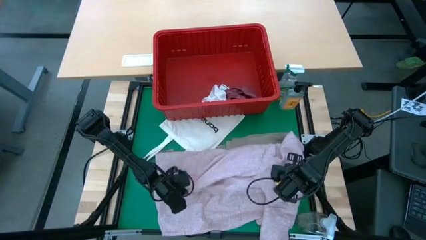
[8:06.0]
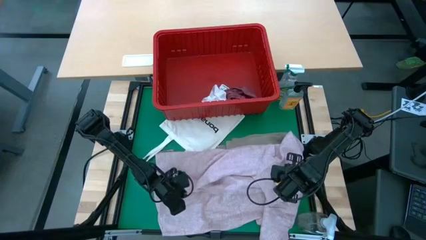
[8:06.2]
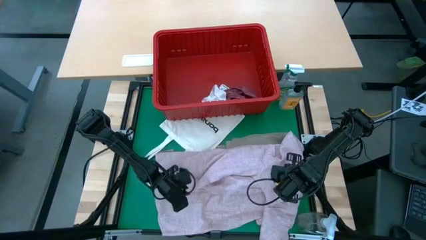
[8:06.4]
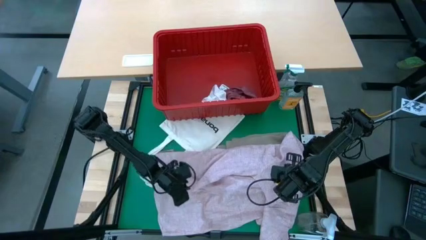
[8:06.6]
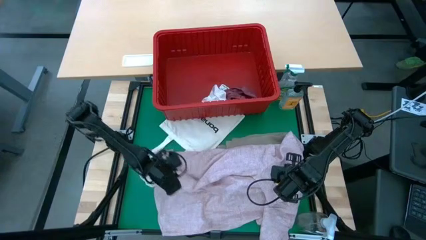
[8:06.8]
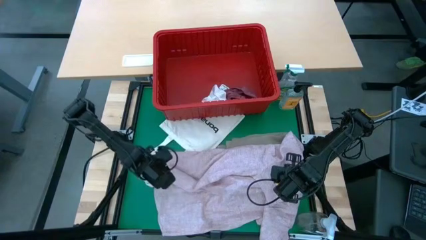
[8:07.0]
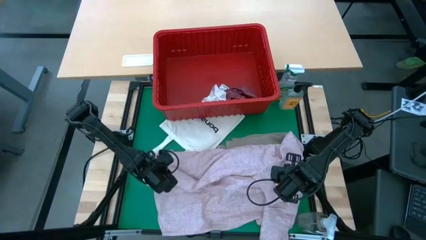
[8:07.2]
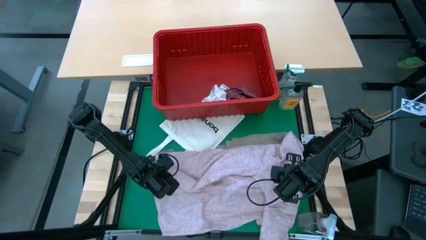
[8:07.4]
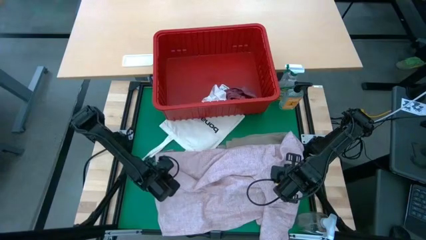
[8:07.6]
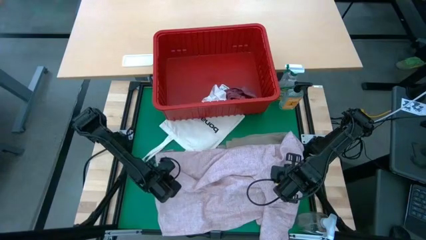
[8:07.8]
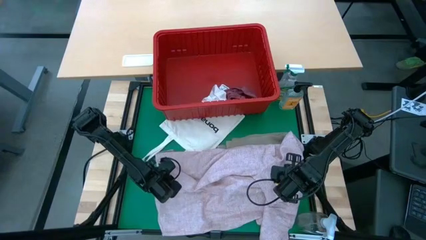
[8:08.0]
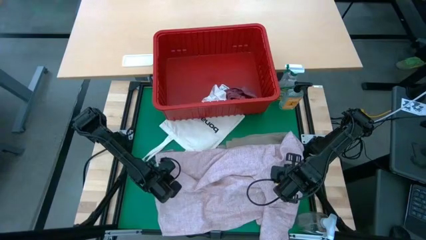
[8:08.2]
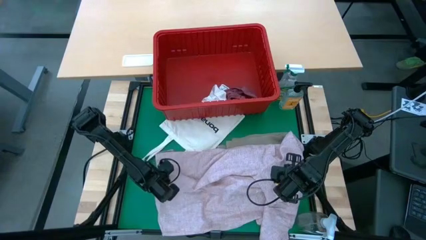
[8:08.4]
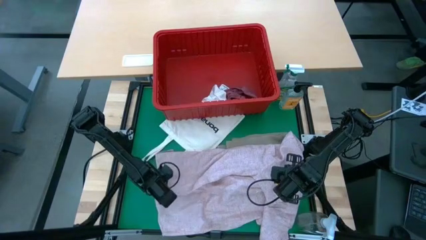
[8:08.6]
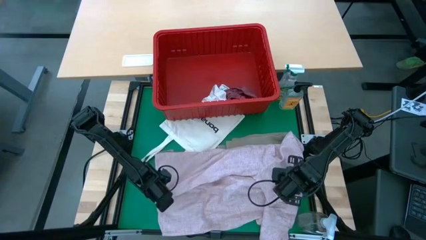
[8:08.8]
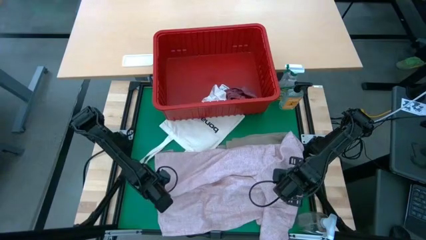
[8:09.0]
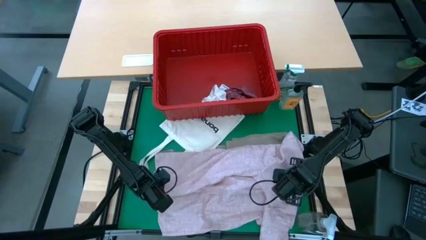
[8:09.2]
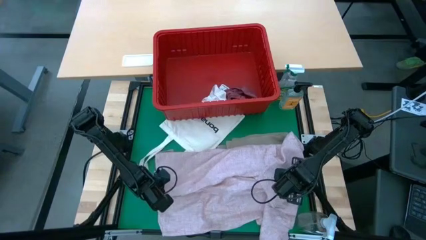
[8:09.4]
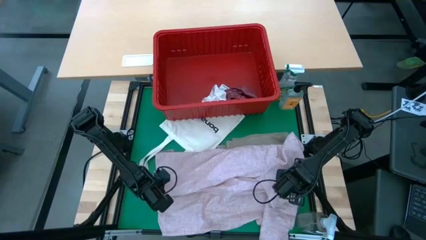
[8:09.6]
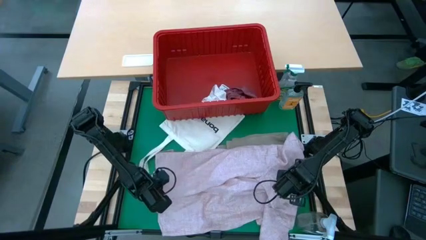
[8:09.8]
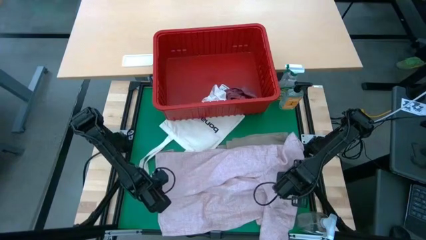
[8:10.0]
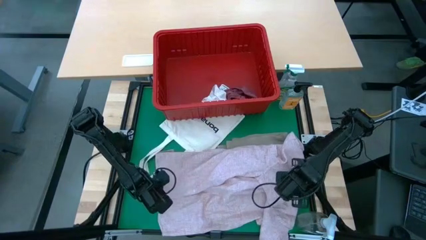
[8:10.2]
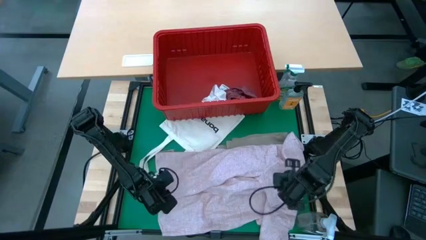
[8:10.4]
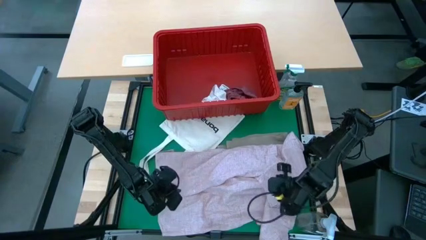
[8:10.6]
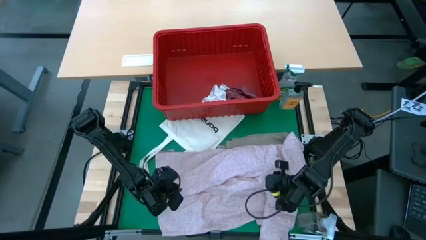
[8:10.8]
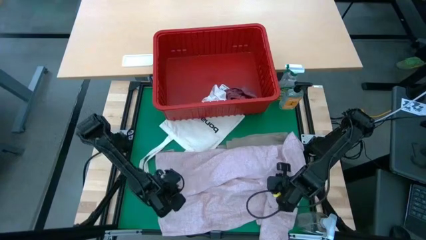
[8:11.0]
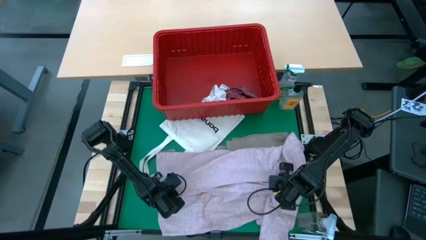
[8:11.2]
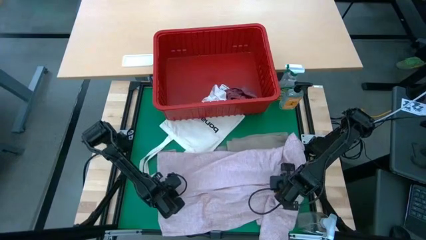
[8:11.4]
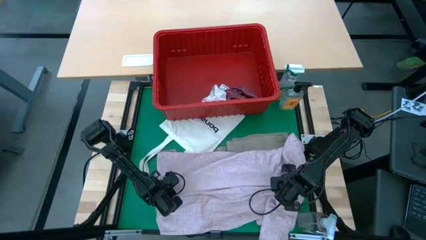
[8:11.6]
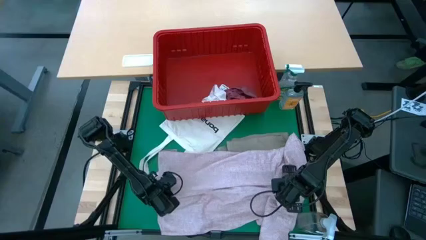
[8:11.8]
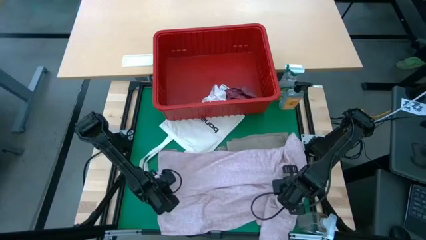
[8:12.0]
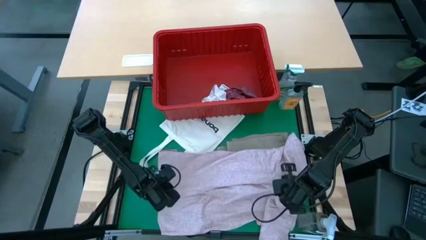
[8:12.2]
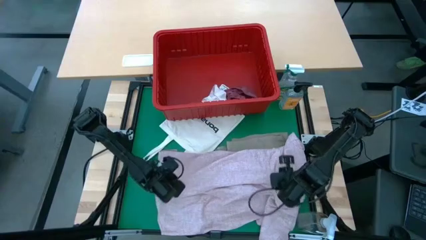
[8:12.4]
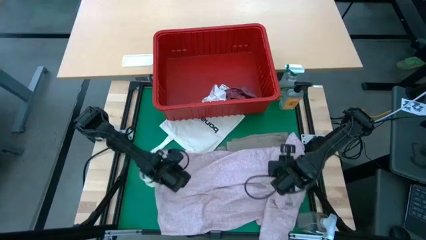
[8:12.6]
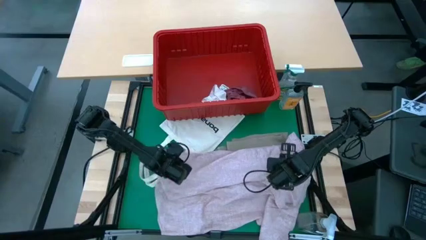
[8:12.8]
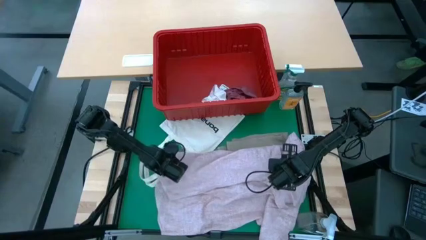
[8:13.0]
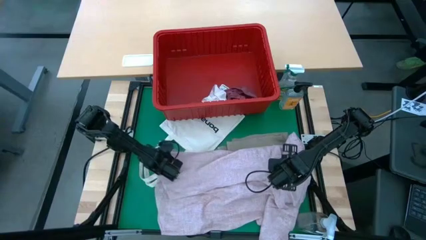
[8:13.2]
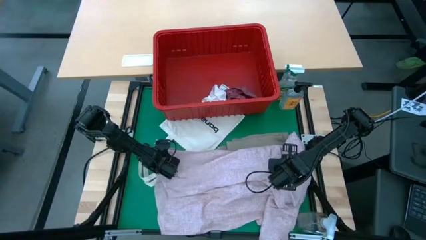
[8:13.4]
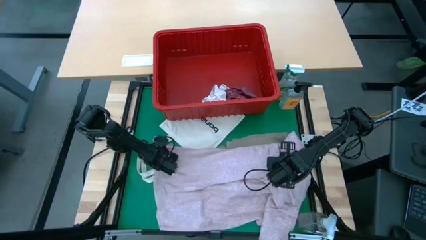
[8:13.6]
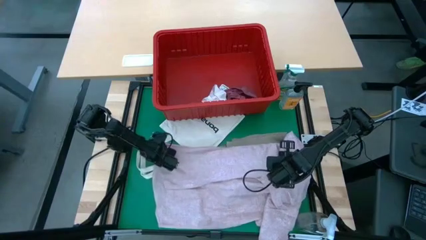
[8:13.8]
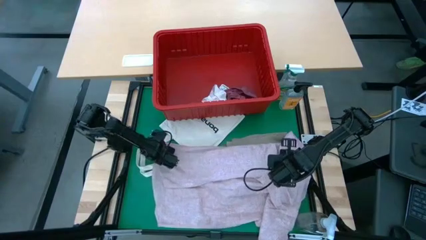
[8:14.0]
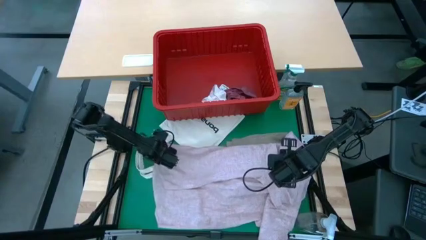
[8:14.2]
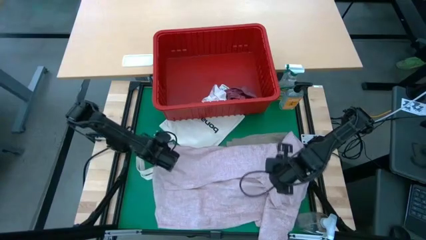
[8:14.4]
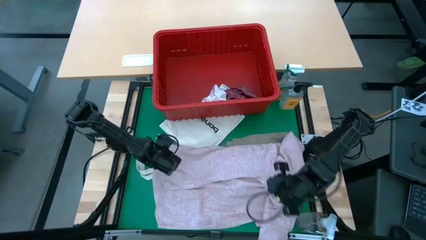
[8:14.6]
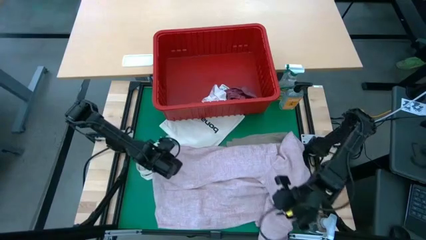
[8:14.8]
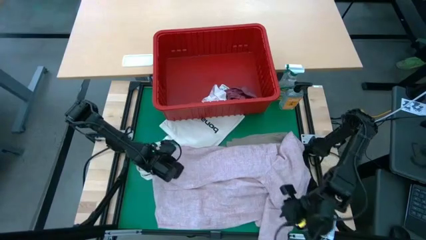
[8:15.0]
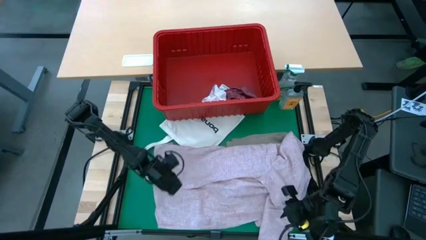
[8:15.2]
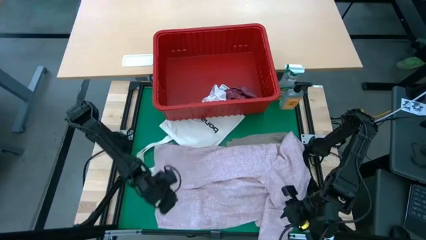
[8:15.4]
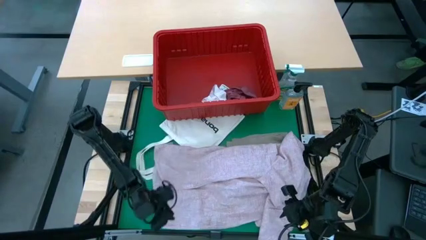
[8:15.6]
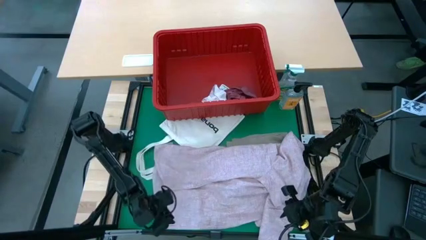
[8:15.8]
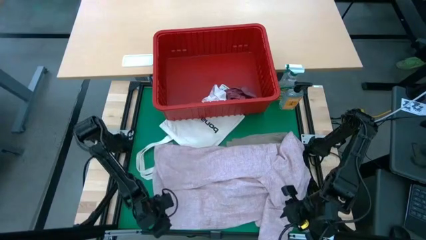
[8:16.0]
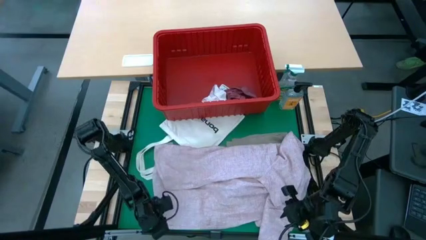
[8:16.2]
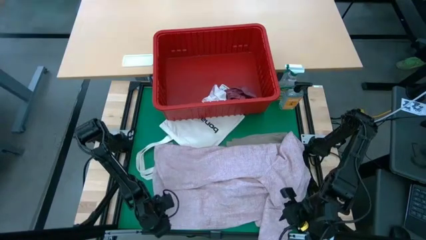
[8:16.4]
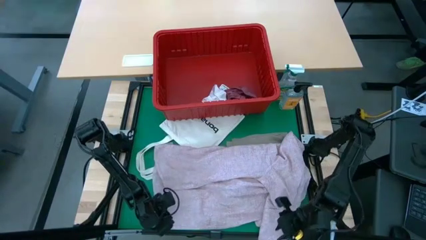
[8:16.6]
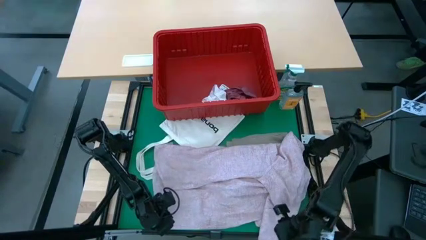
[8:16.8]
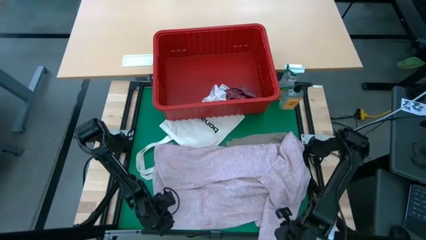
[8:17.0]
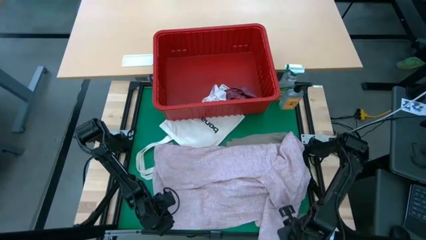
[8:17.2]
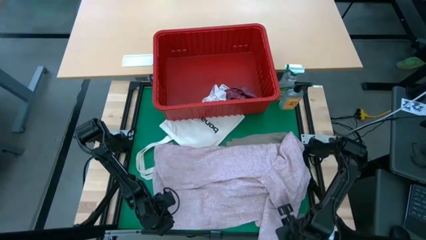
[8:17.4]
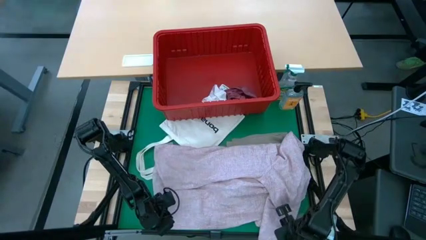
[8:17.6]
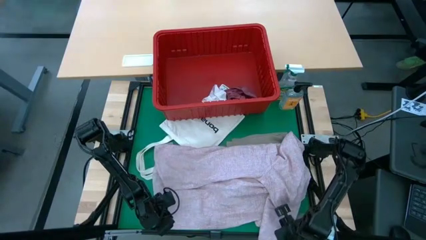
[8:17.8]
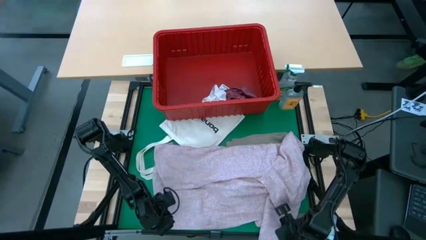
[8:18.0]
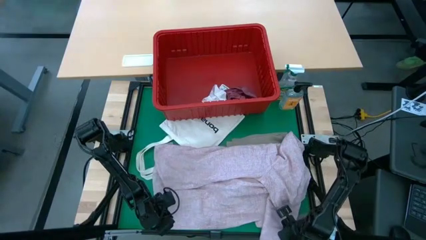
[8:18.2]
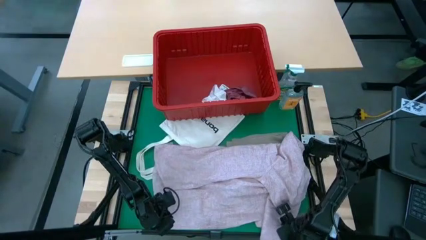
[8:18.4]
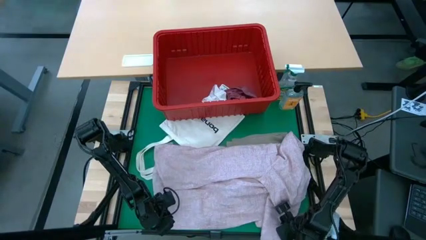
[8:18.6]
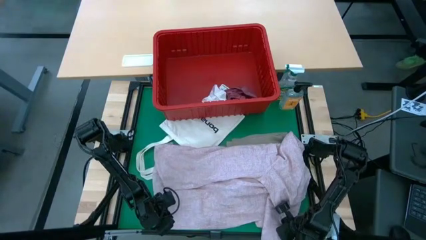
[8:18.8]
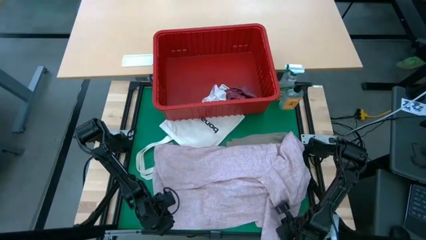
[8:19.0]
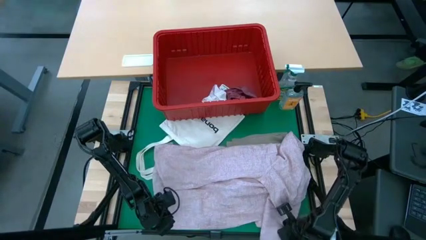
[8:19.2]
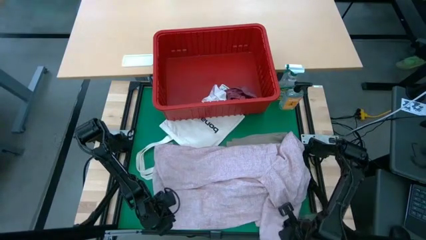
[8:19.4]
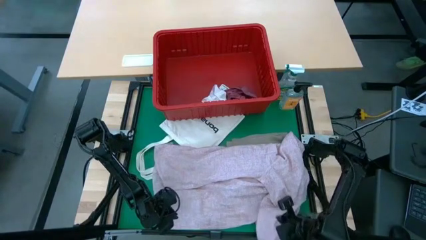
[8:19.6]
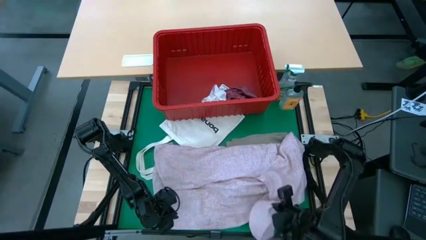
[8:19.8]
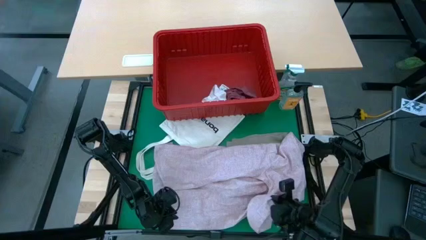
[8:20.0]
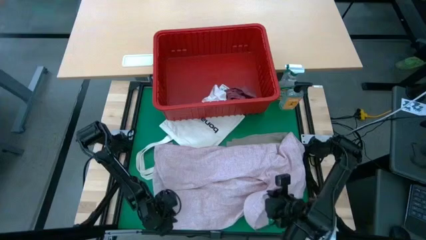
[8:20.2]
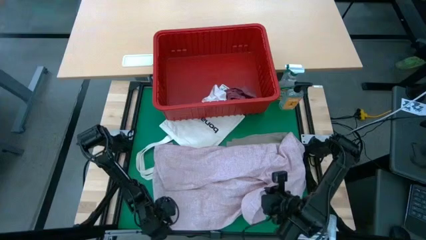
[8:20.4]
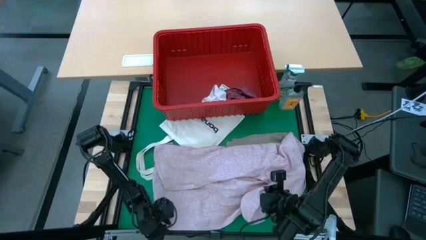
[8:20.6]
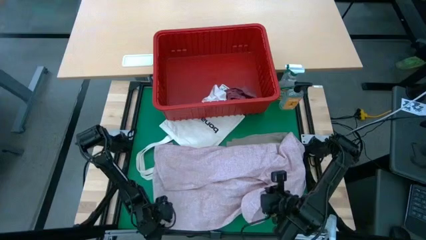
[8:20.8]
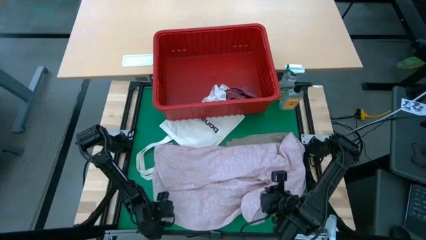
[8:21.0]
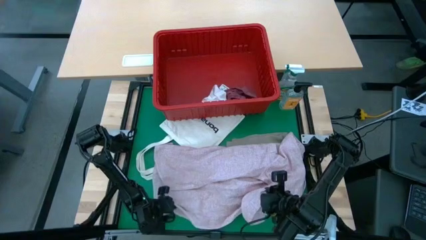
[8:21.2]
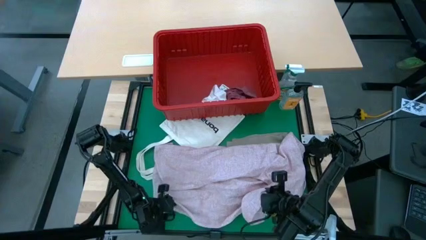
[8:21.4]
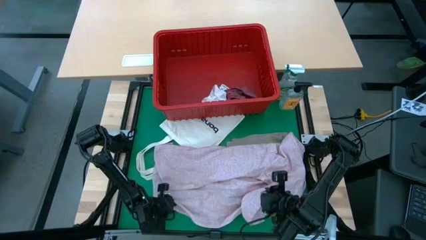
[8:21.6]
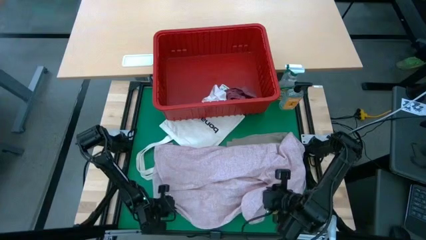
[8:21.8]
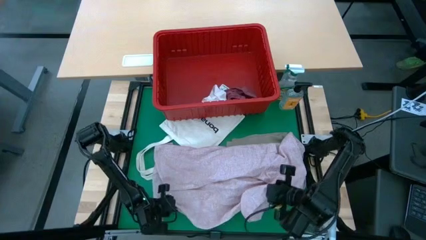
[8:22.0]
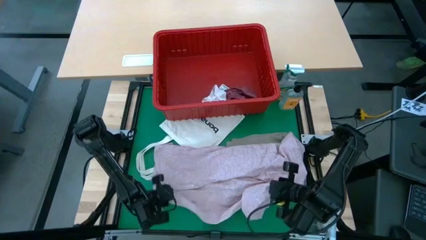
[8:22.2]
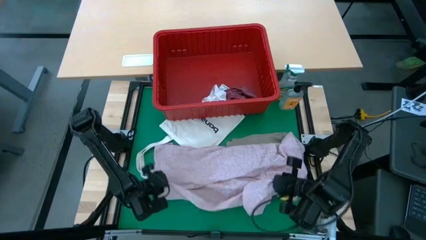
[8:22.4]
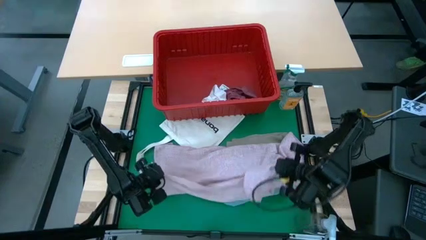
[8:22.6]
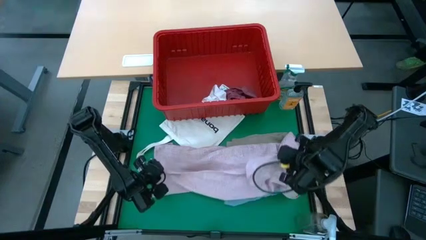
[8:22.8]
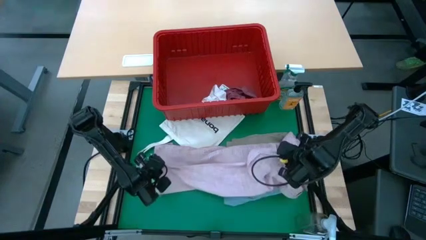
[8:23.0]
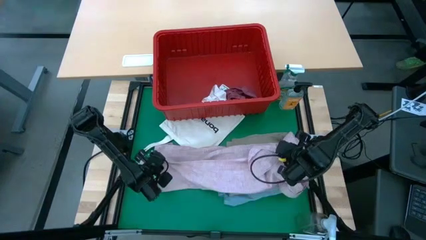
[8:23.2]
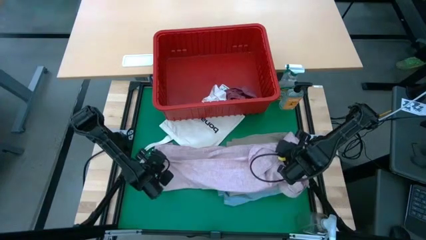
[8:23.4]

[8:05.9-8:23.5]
Task: Fold laundry
Fold the pink shirt
